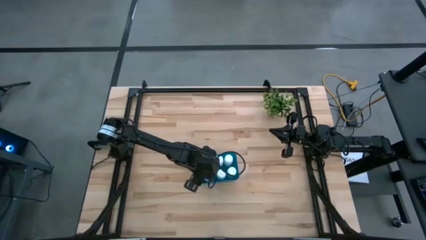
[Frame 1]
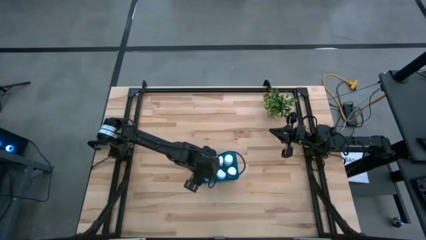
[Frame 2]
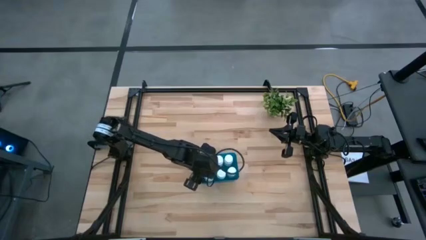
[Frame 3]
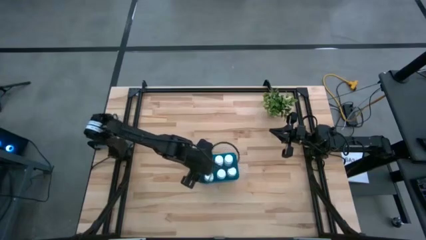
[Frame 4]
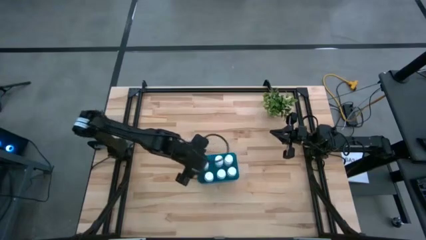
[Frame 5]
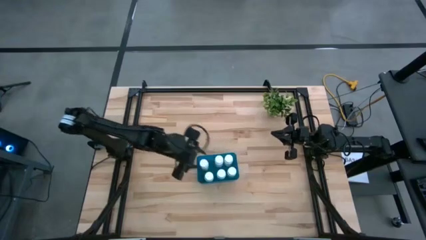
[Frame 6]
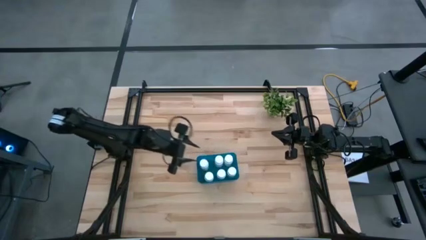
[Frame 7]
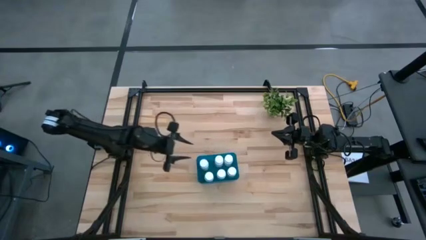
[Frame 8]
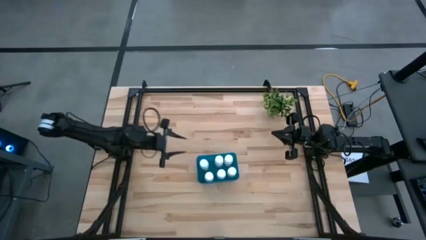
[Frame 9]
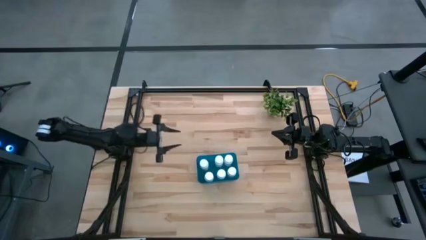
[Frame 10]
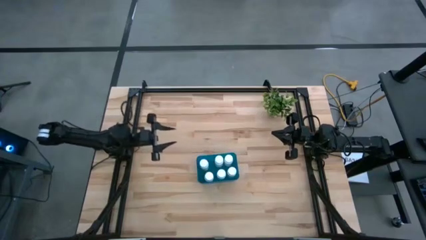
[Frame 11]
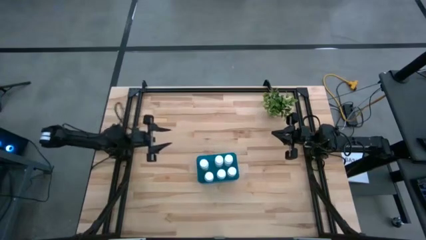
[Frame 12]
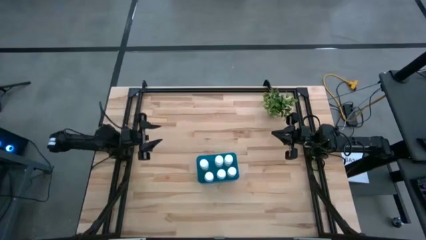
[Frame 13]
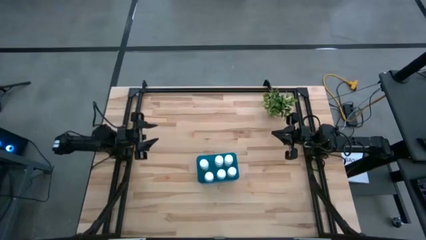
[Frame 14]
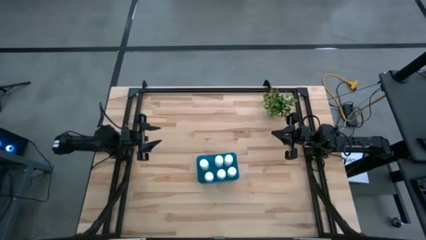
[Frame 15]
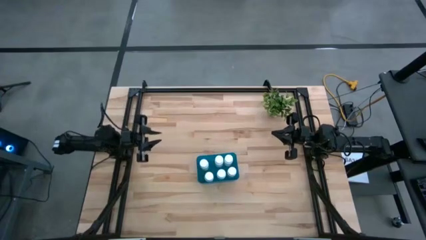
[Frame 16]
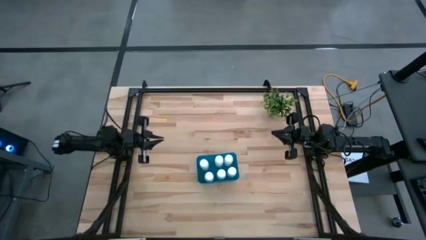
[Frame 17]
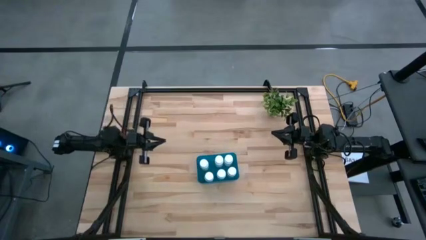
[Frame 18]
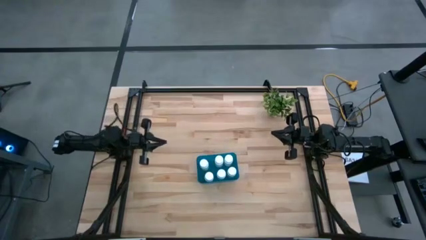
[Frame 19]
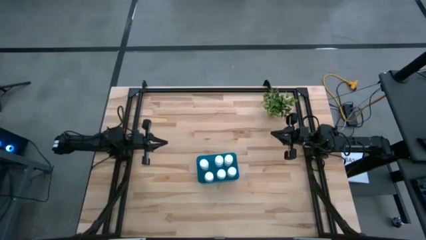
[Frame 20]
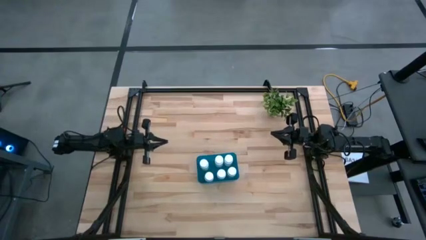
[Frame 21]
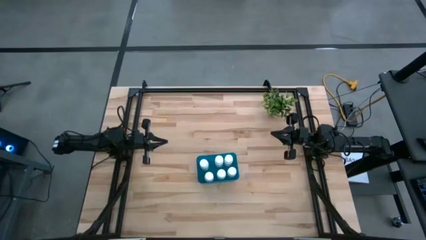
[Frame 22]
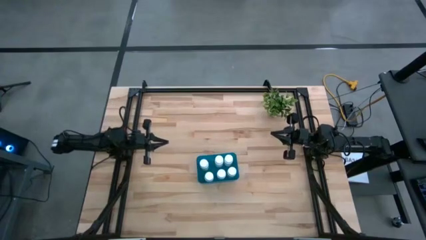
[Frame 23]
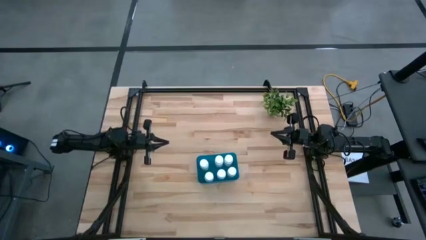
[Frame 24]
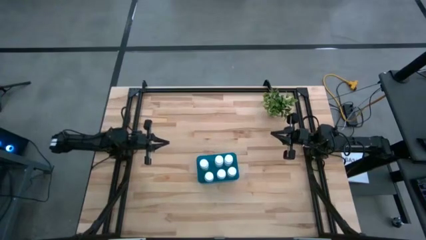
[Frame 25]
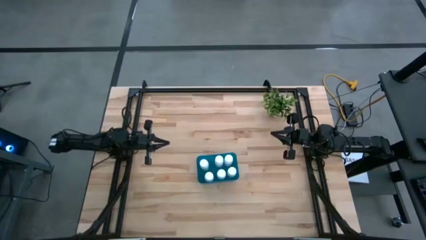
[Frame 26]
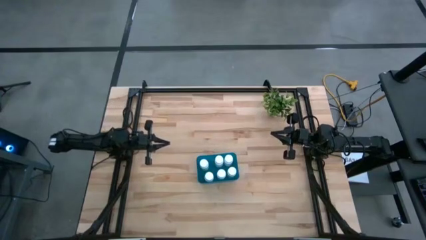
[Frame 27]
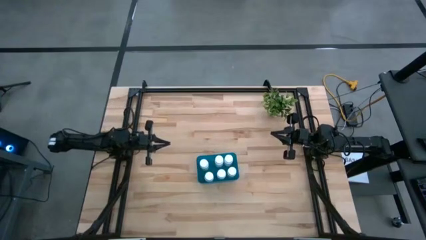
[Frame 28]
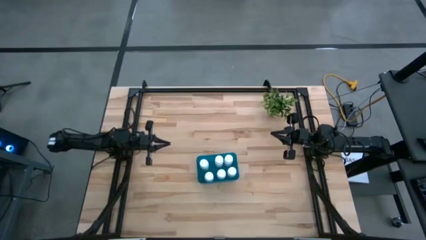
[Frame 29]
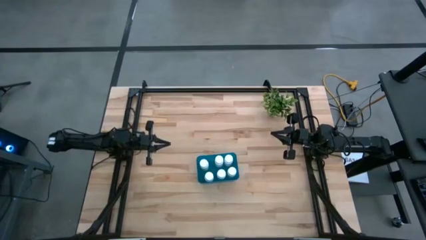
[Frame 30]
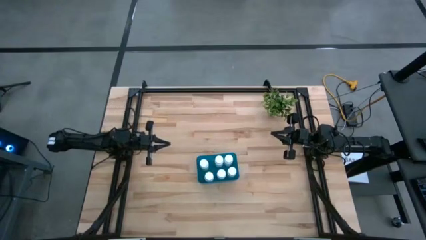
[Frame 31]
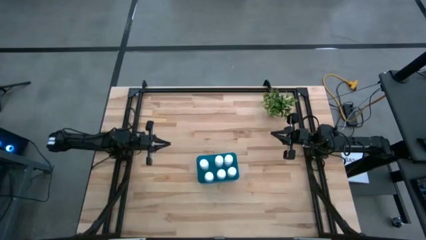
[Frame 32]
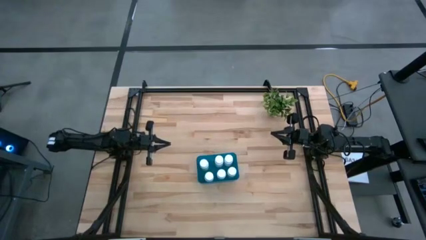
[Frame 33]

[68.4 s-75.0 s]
Task: Pick and place pill bottles into a basket
Return to Home Position

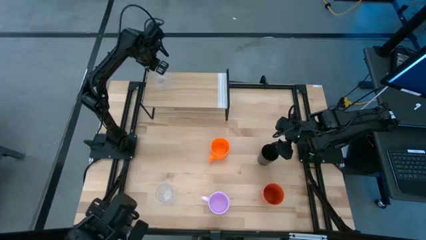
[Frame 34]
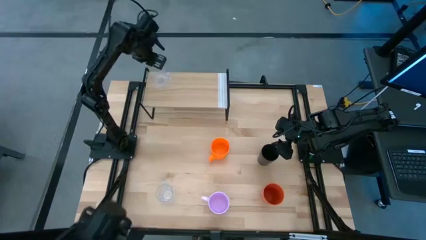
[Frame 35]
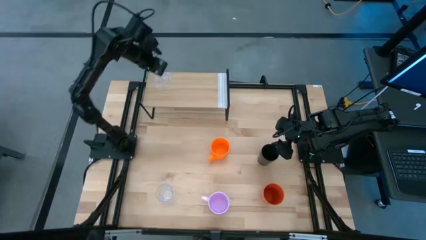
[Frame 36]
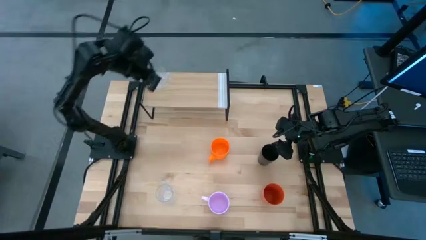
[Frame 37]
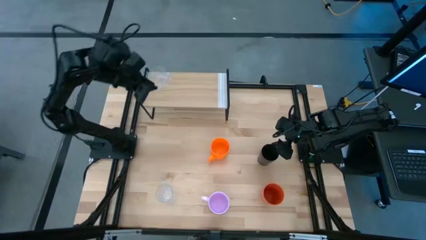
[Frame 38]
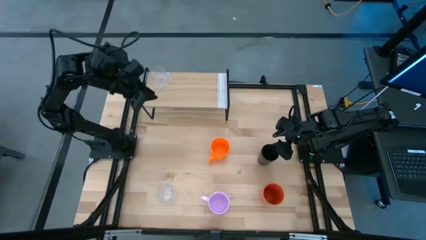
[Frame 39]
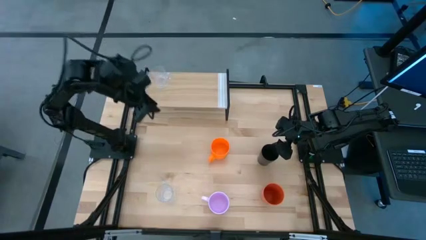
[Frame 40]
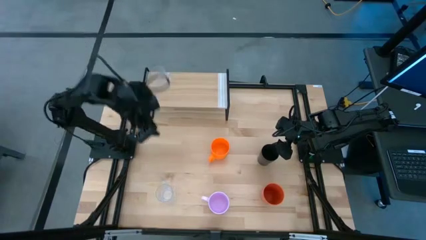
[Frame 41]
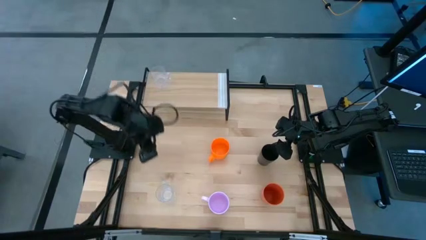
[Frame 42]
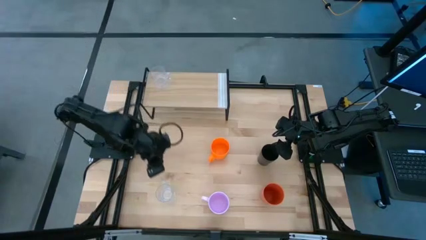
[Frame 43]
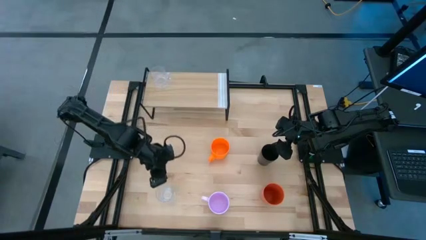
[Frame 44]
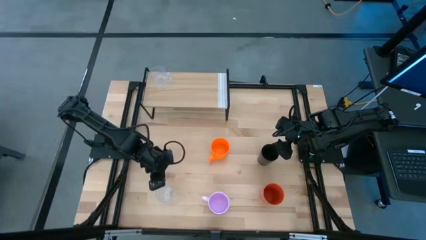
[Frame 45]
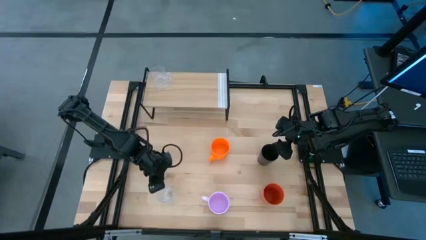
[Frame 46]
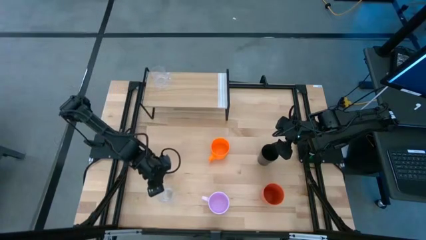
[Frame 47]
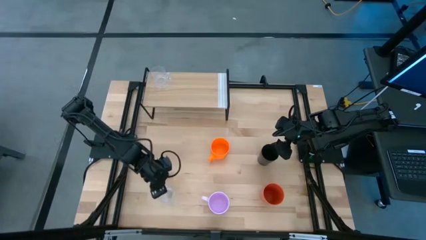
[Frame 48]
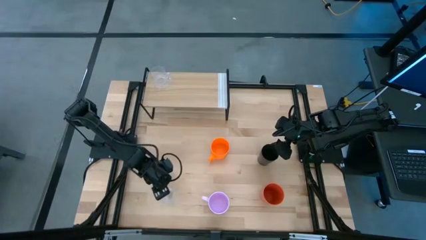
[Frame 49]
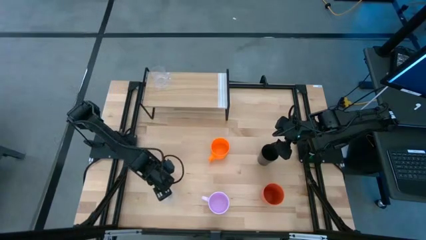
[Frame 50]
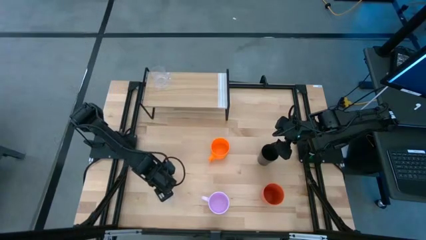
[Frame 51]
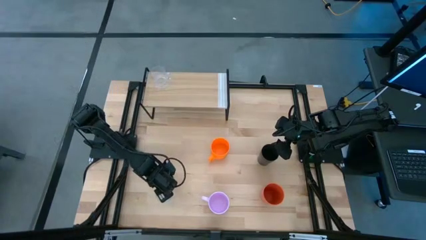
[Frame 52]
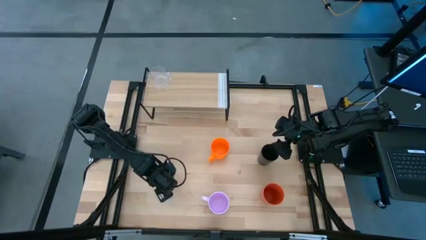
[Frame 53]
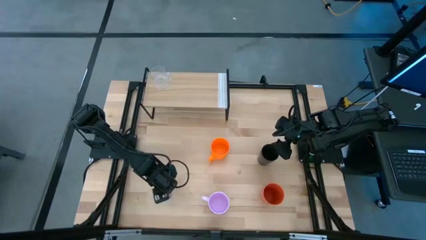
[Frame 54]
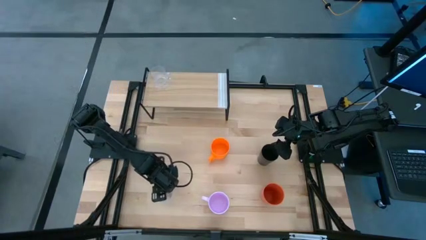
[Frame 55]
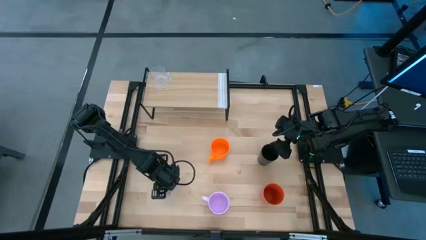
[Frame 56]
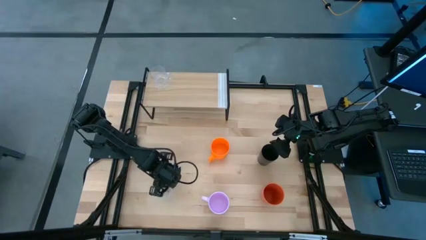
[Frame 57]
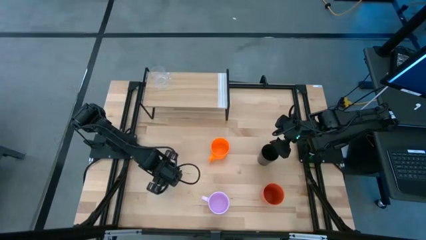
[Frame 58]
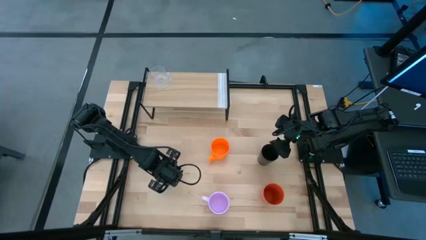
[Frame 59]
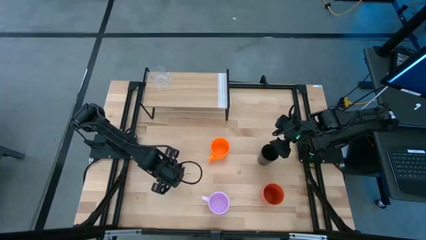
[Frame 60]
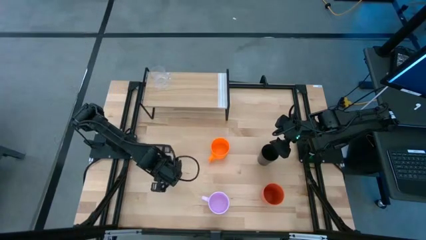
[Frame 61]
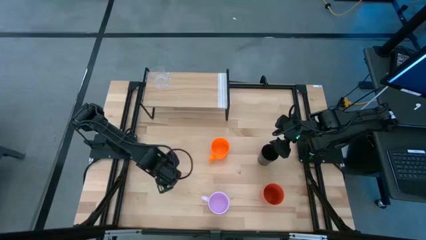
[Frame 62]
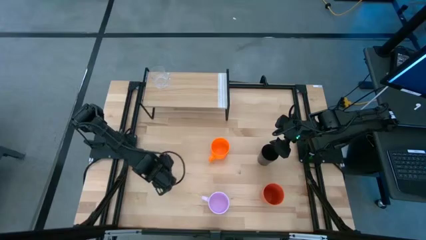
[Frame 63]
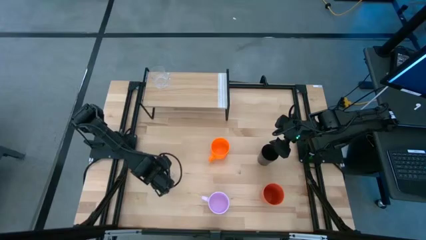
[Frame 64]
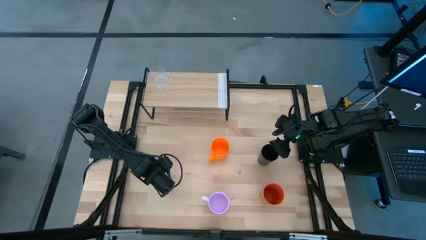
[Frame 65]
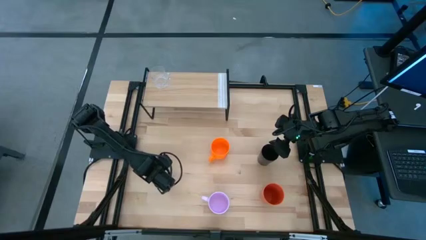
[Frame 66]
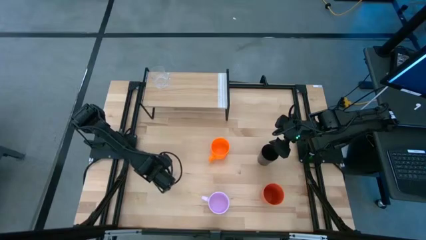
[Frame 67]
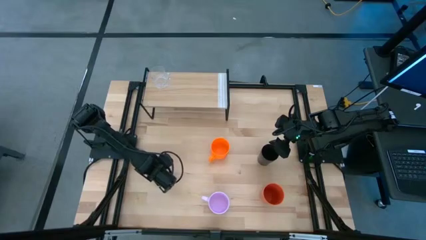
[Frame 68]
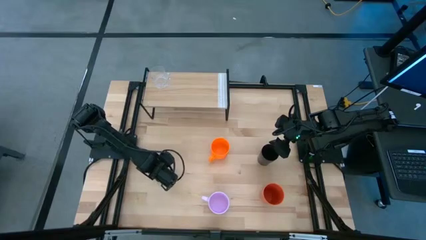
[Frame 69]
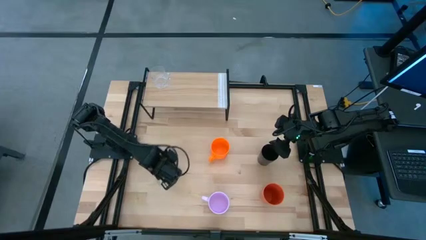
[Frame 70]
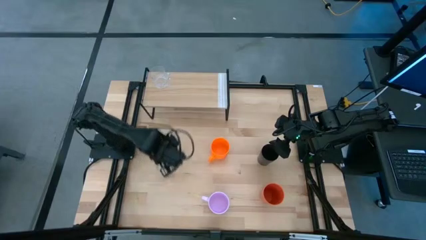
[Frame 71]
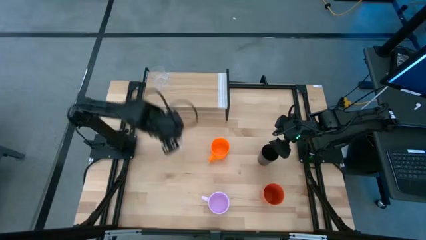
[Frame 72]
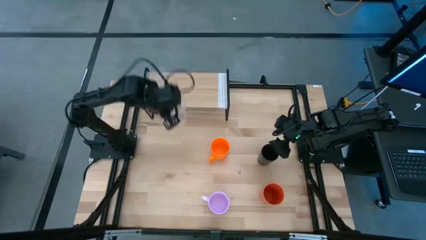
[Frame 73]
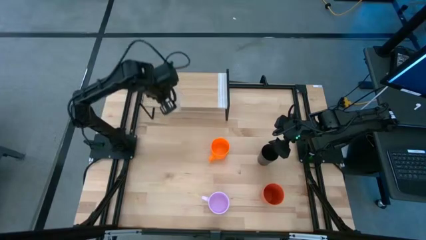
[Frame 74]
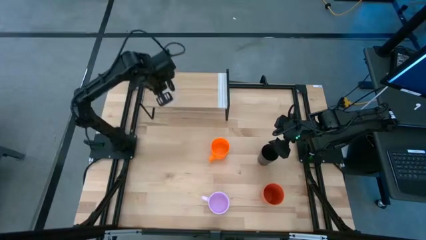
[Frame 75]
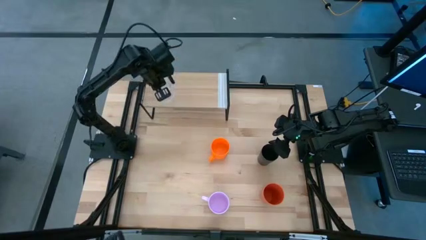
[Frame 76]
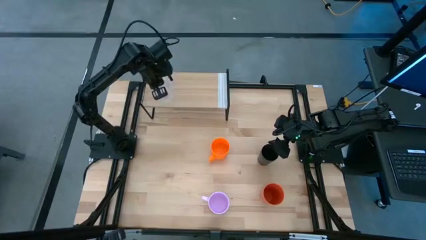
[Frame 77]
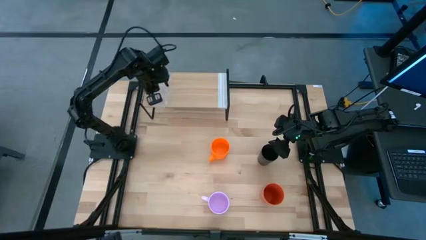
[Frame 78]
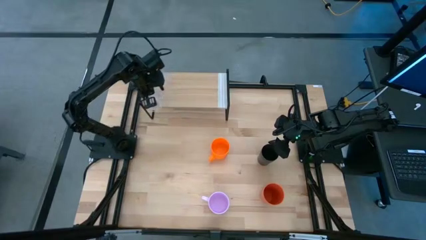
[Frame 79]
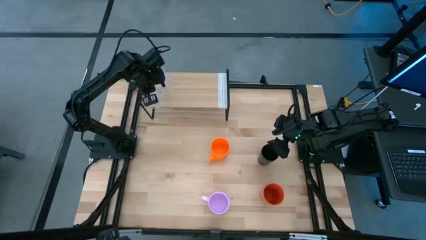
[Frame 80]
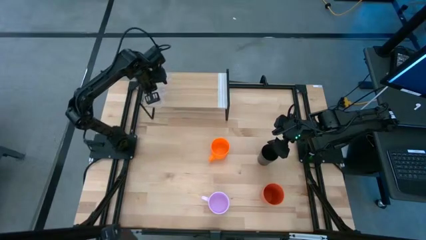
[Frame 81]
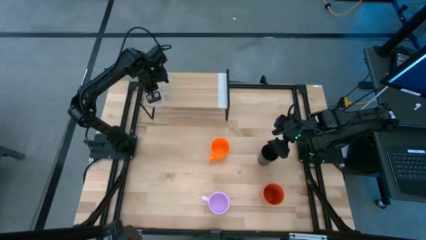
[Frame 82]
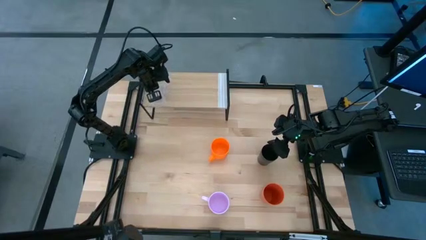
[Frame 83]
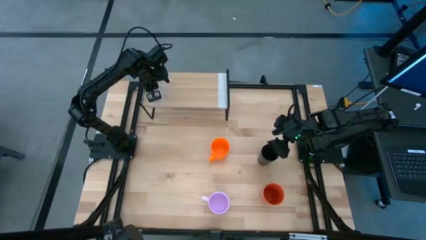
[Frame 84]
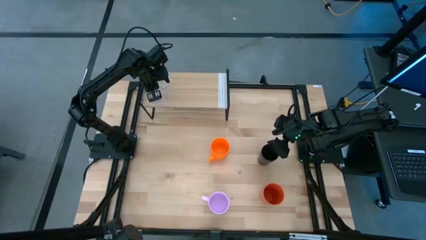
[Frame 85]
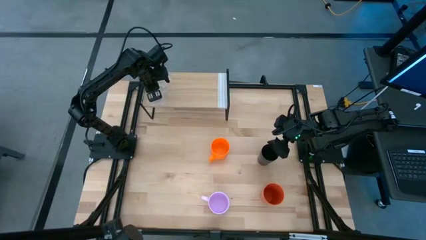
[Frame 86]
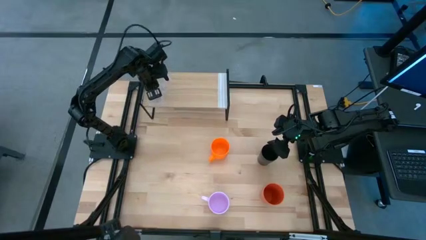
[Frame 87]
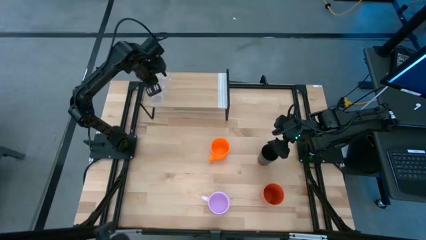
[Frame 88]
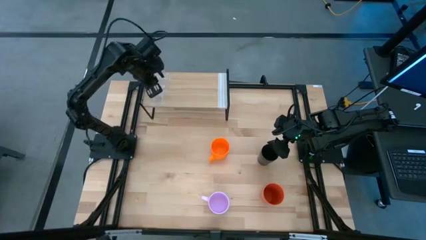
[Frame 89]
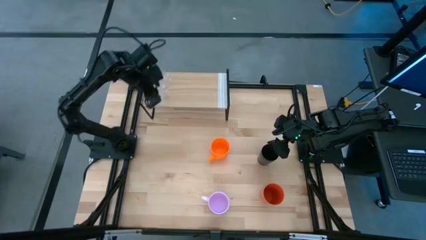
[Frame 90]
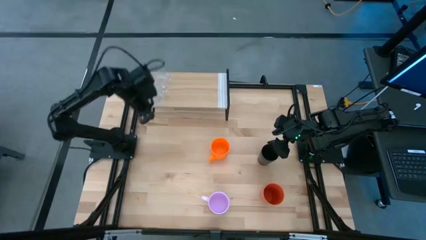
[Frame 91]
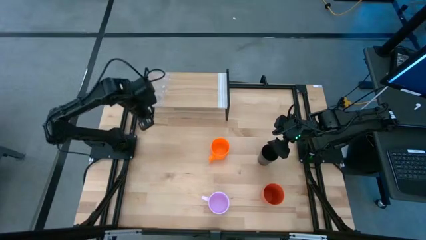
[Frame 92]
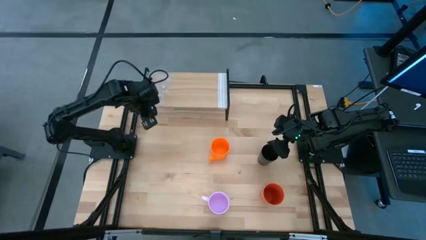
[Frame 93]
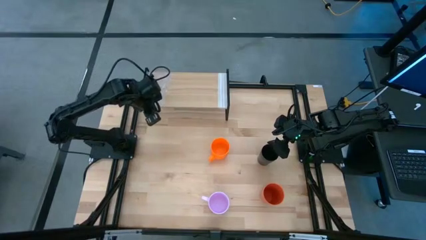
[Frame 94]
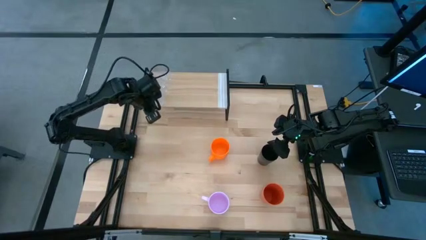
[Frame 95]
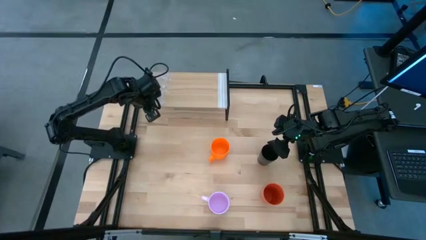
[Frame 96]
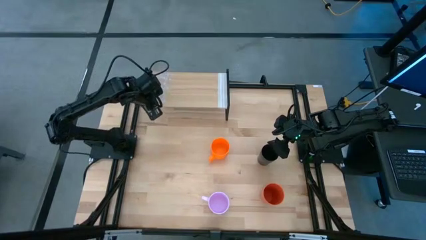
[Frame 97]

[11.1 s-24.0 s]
Task: Stack small to large cups/mugs on shelf
Align the transparent mug with the transparent mug on the shelf
